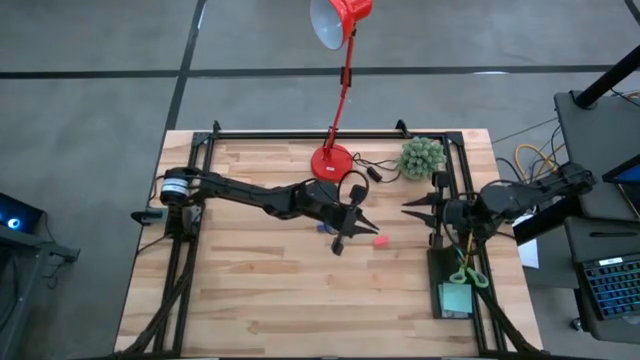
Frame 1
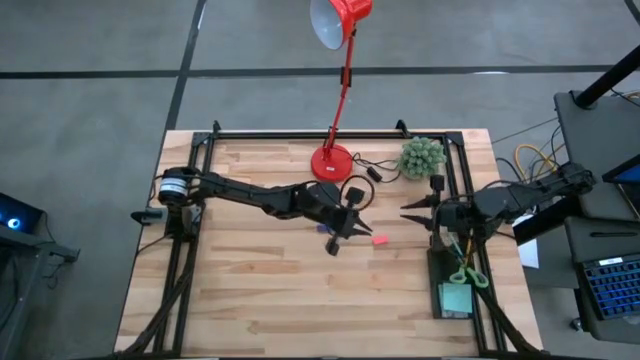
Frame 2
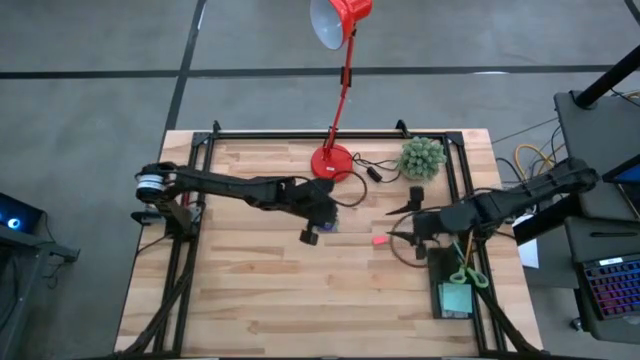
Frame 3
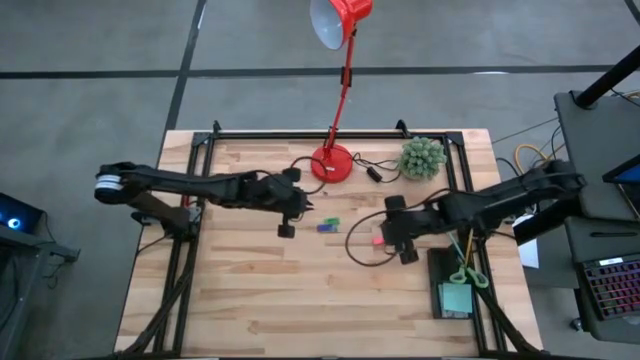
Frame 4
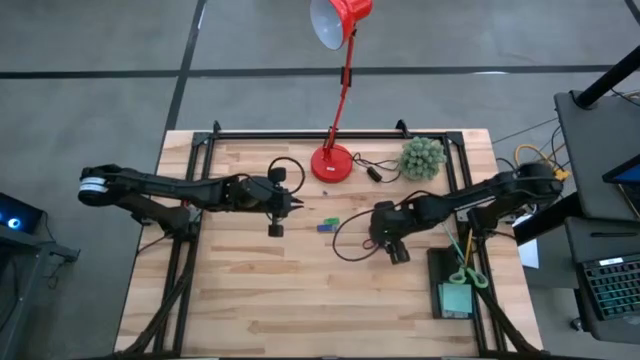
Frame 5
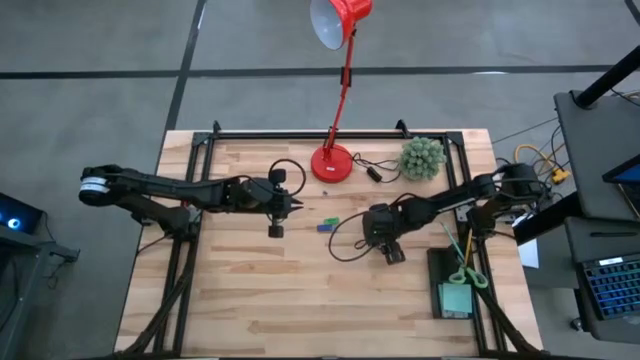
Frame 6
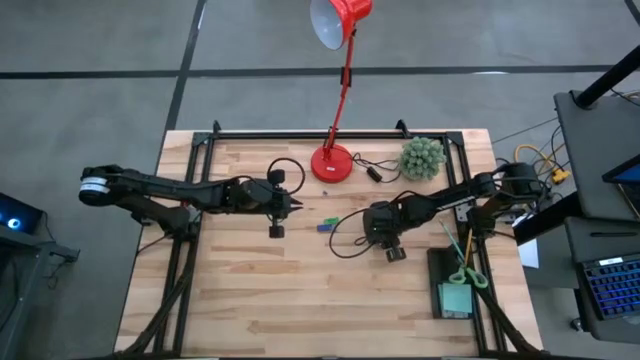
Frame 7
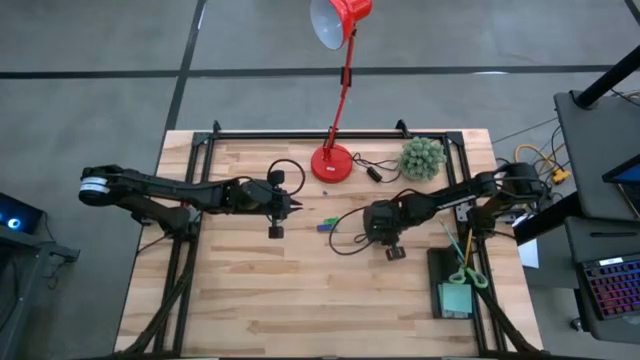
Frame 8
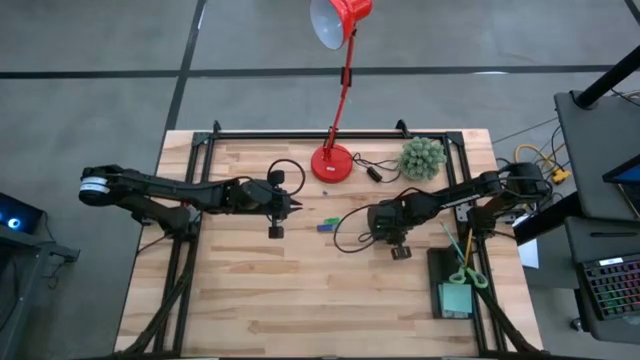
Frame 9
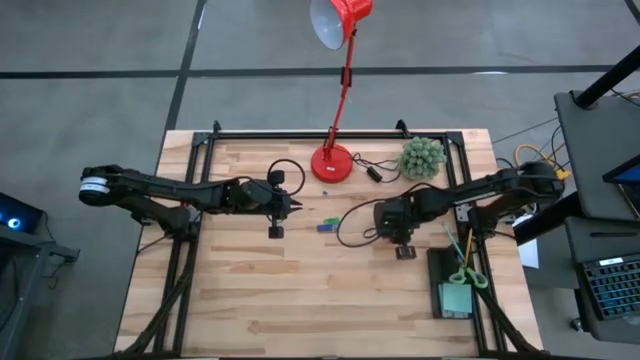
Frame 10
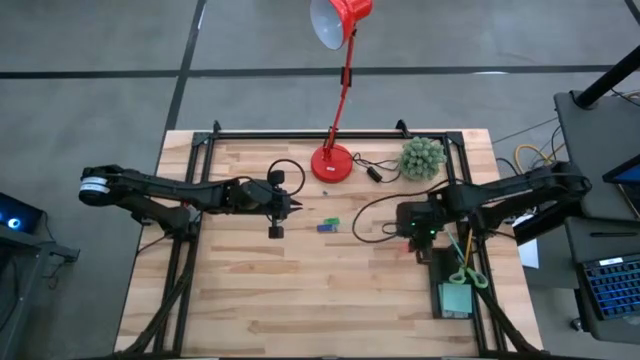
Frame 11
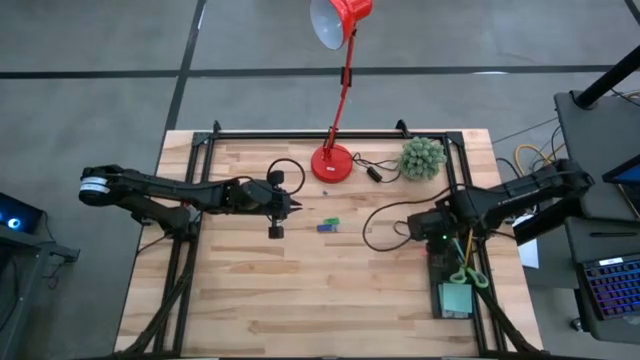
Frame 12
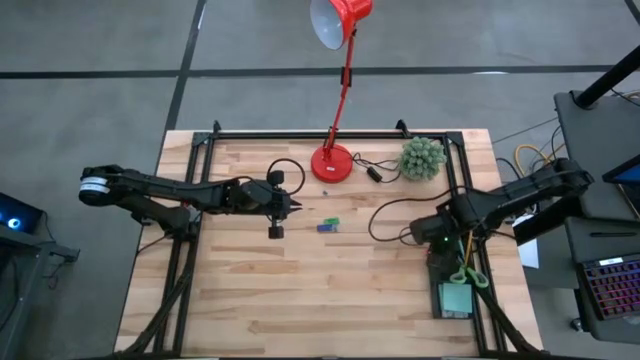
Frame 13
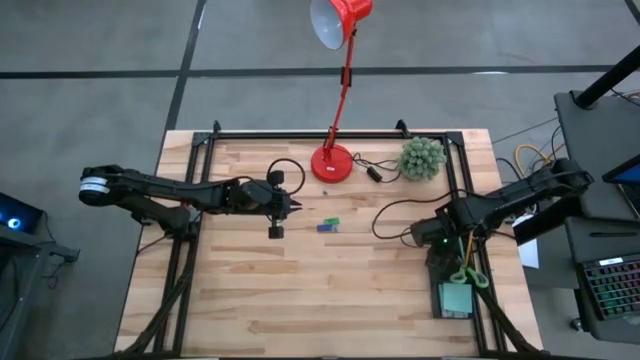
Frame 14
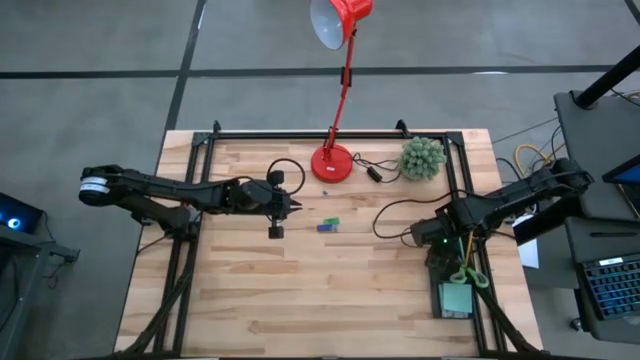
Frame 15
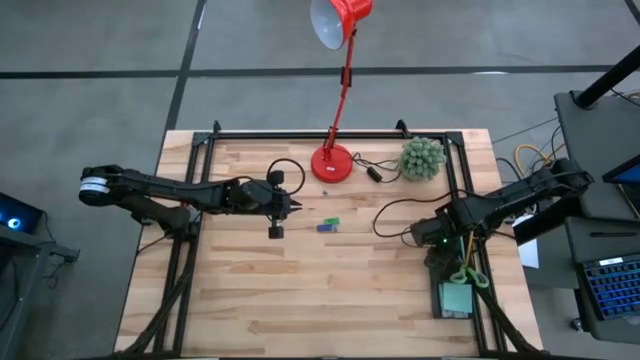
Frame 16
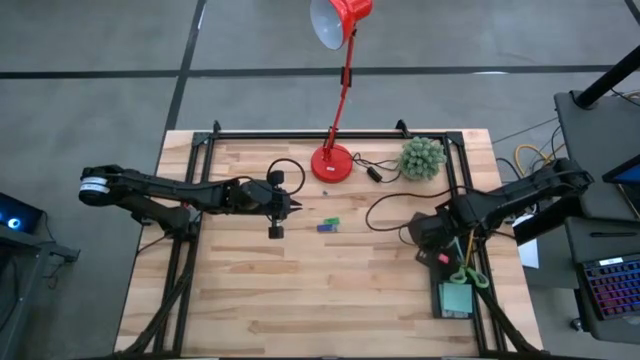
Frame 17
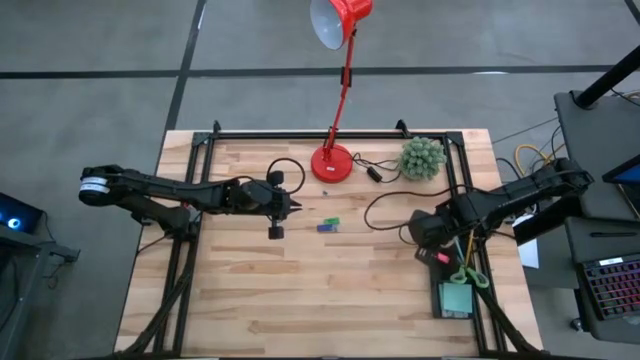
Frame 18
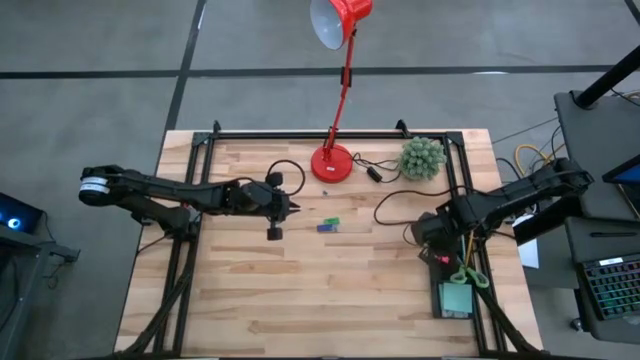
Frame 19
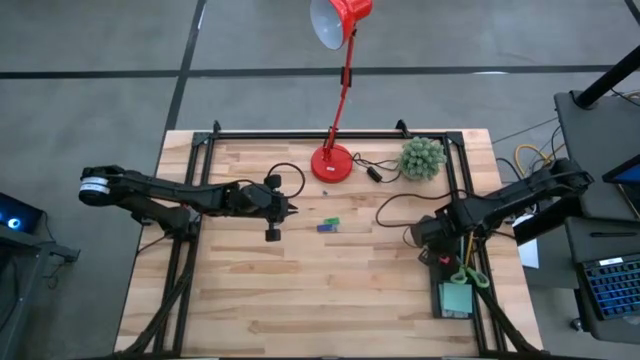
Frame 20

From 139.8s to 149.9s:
Task: Pick and place office supplies into organizer
Put the pink eraser into the black desk organizer

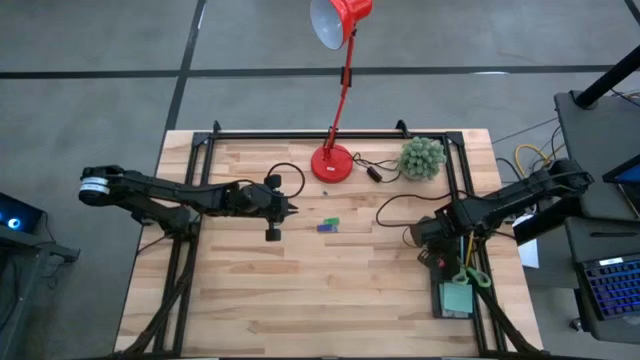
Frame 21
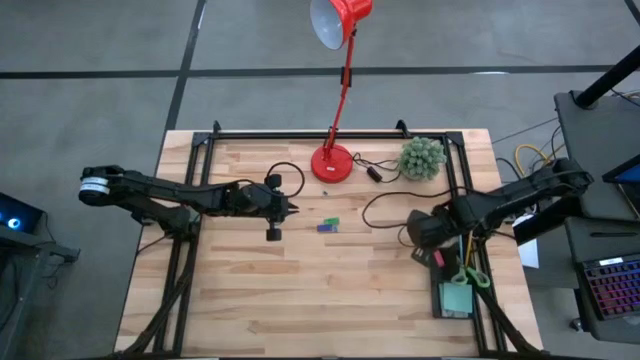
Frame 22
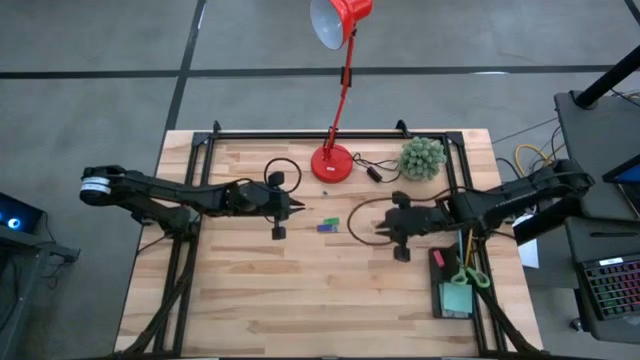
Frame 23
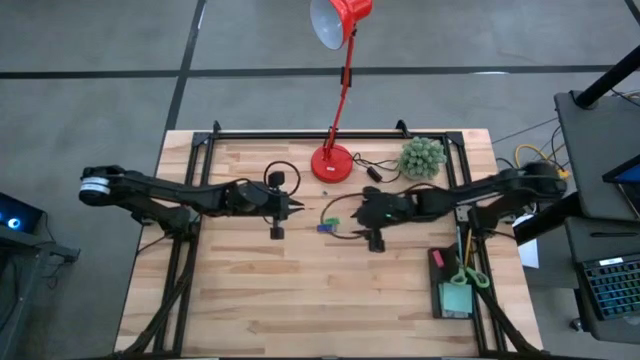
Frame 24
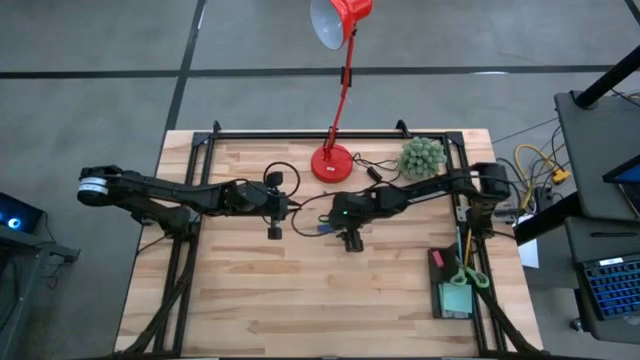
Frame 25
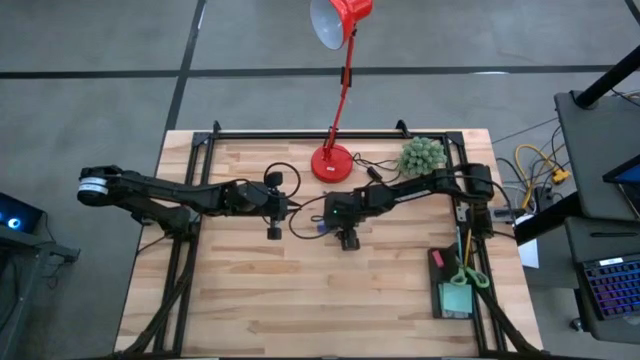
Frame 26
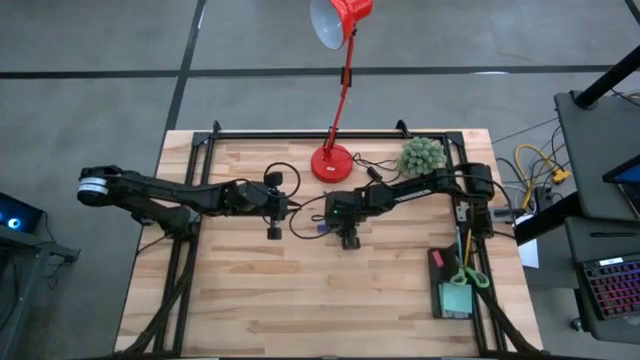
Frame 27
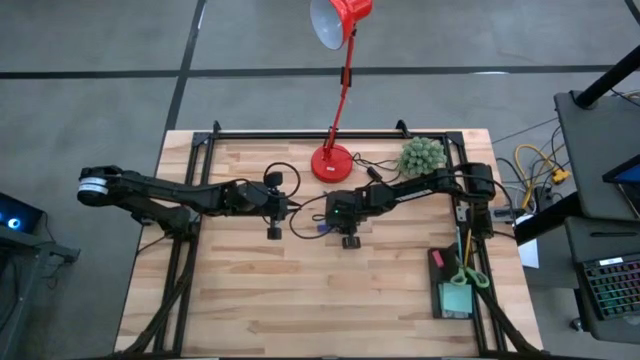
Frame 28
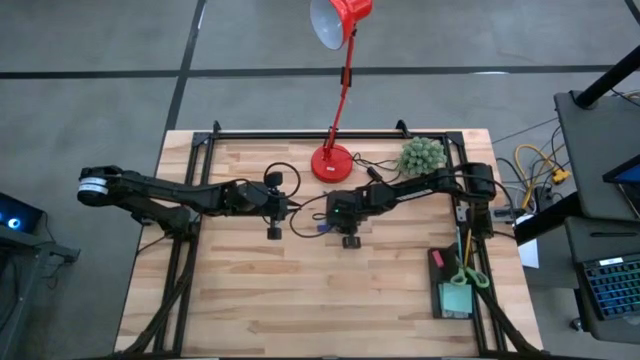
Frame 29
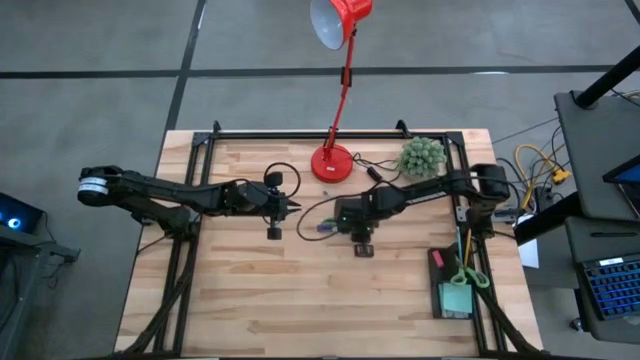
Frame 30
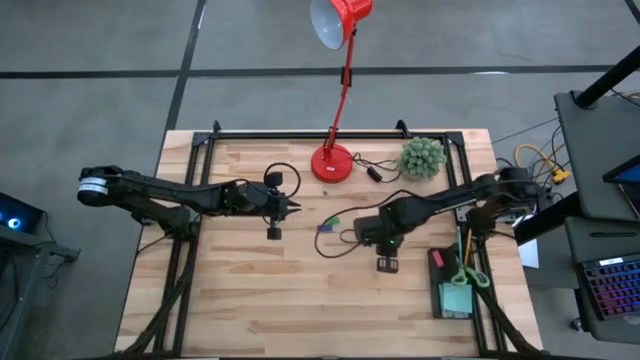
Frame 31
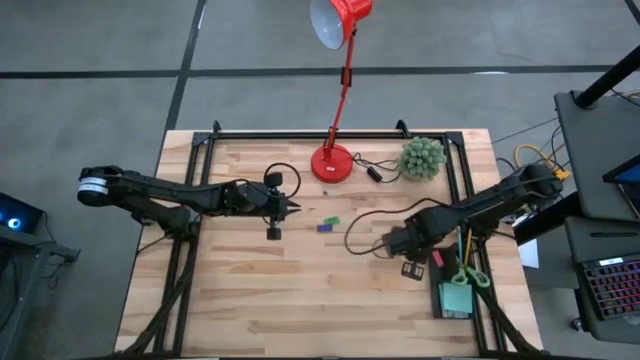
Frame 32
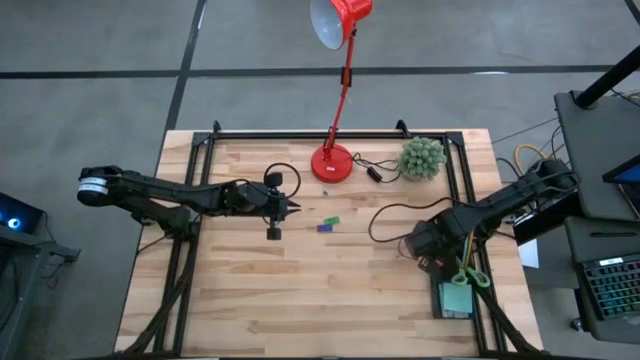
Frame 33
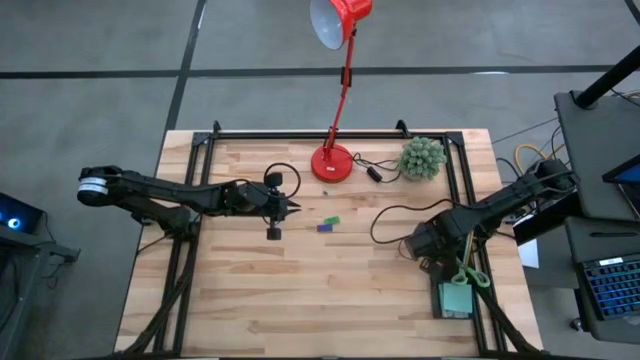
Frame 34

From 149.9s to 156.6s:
Put the bottom blue binder clip into the black desk organizer

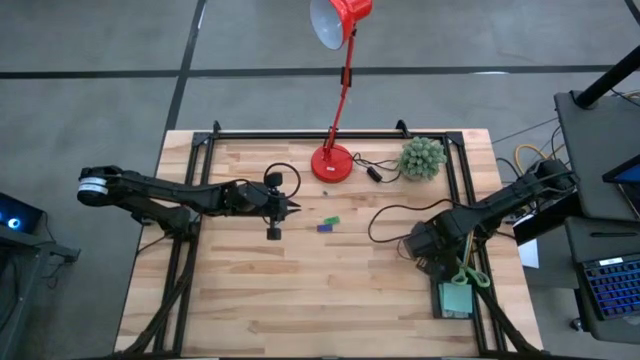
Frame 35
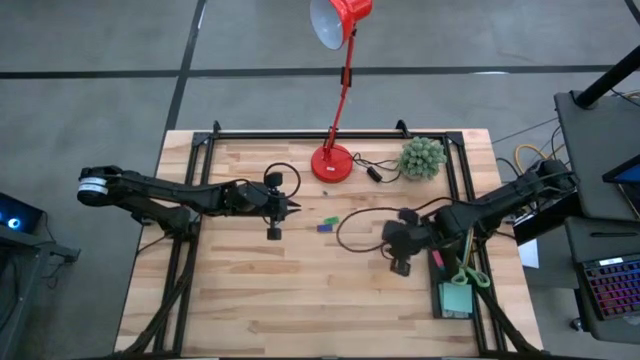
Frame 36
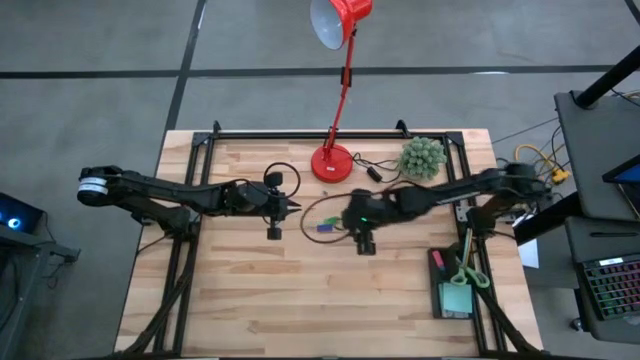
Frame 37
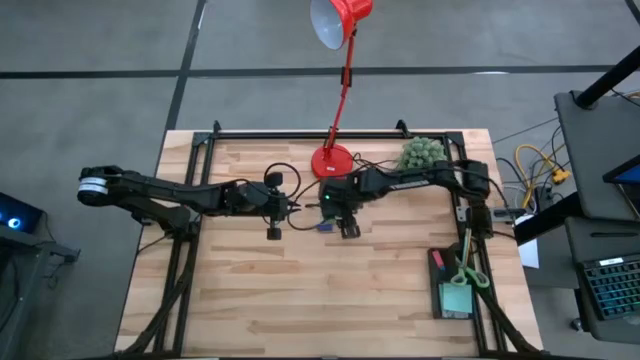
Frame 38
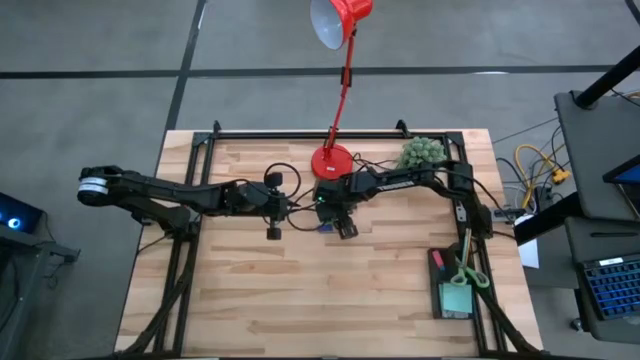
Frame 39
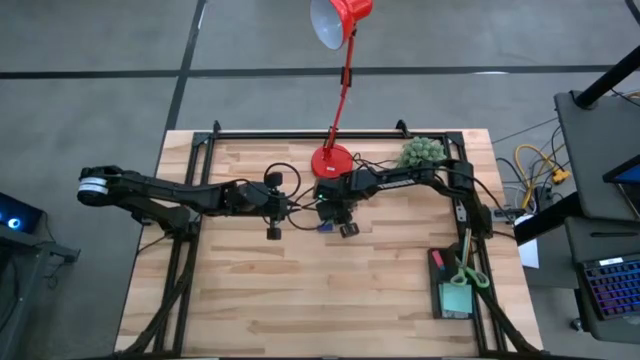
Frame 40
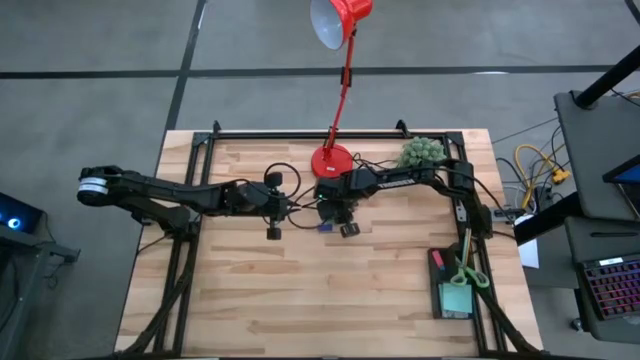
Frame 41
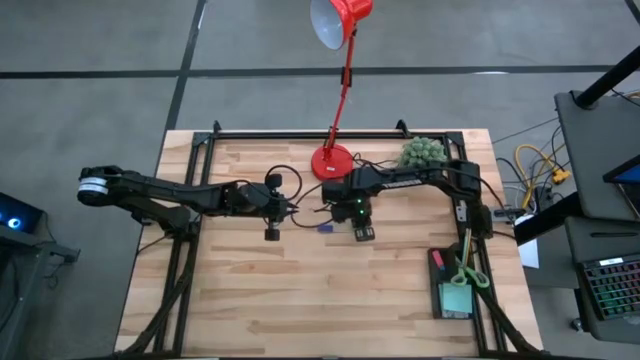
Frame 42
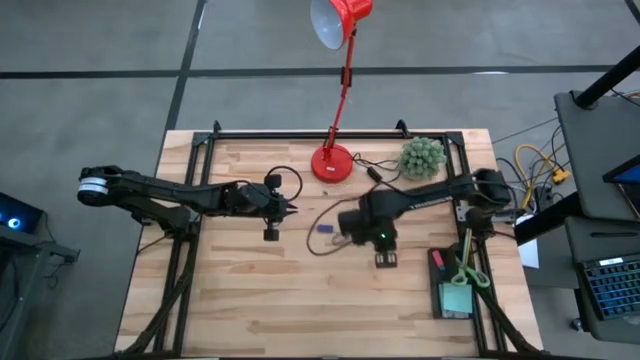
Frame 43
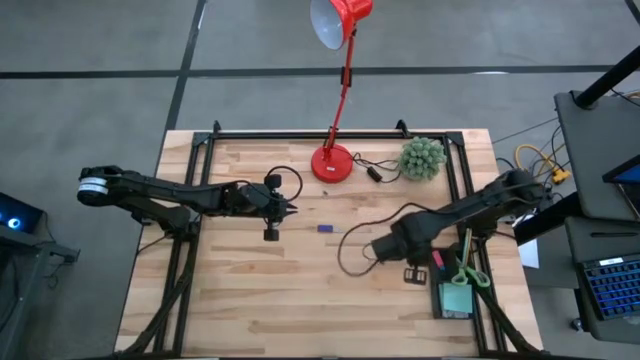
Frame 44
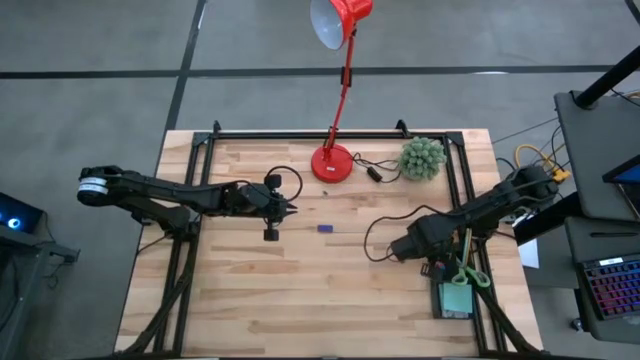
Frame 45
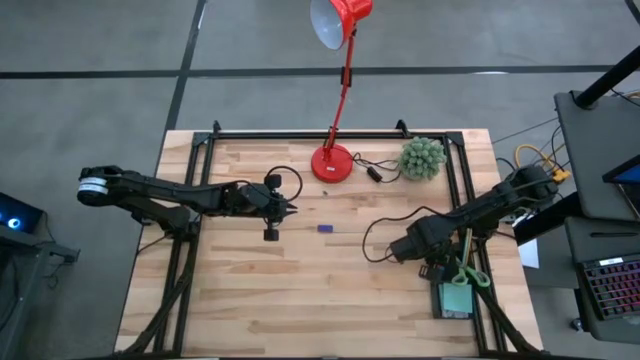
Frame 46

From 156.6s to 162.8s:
Put the green eraser into the black desk organizer
